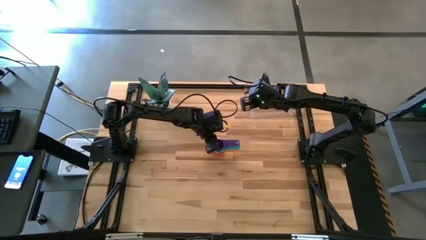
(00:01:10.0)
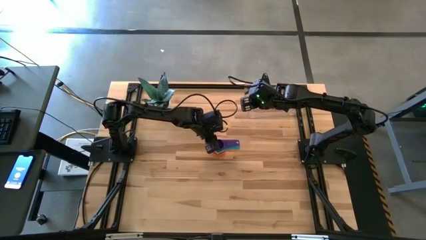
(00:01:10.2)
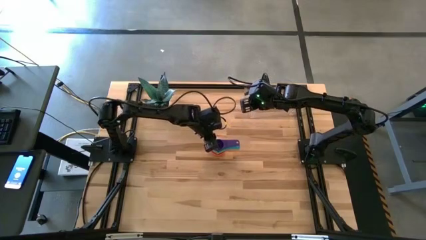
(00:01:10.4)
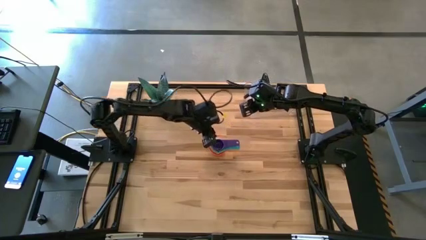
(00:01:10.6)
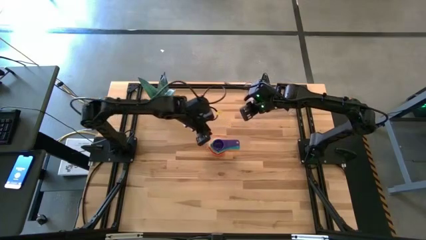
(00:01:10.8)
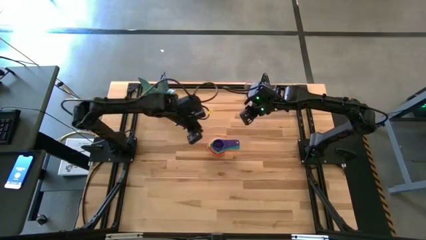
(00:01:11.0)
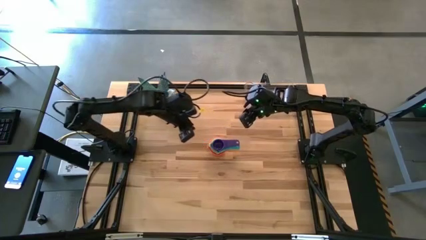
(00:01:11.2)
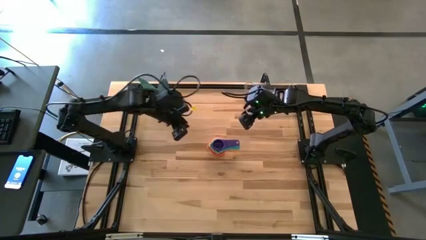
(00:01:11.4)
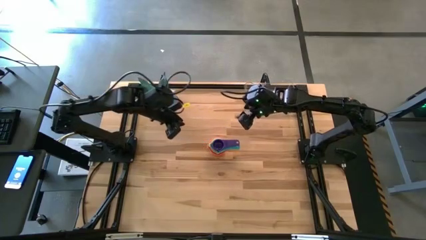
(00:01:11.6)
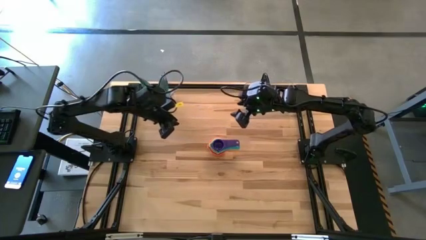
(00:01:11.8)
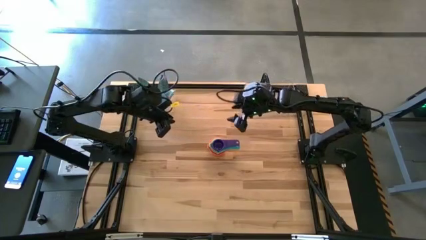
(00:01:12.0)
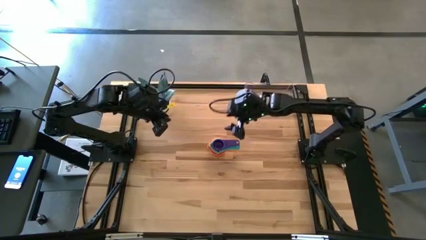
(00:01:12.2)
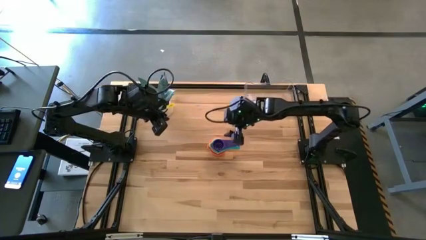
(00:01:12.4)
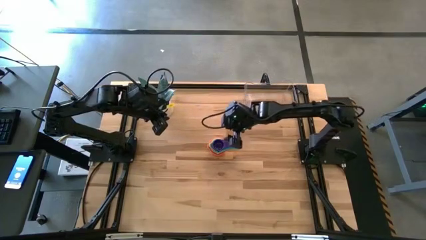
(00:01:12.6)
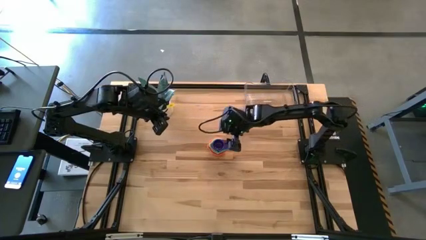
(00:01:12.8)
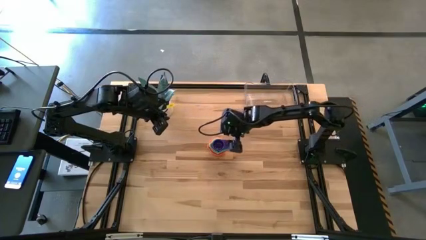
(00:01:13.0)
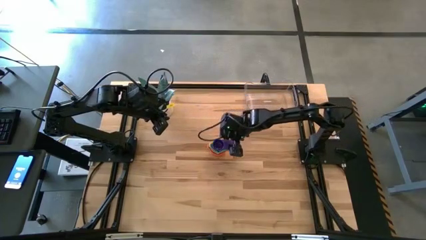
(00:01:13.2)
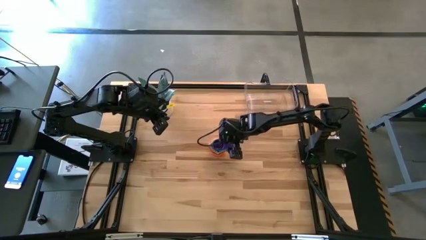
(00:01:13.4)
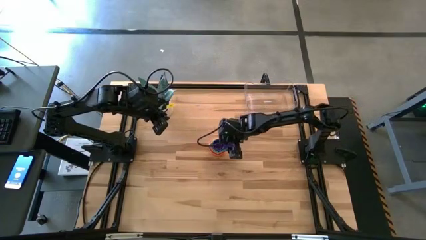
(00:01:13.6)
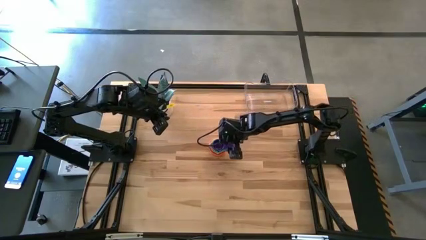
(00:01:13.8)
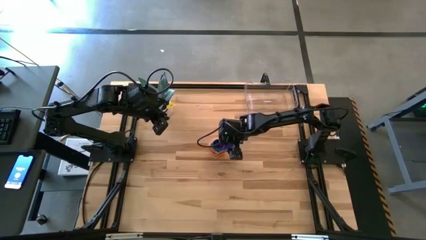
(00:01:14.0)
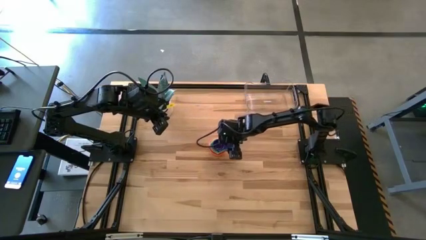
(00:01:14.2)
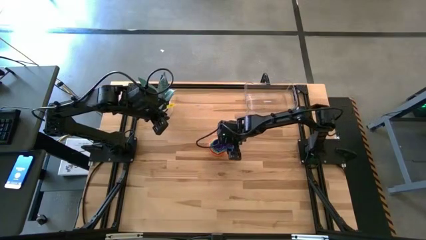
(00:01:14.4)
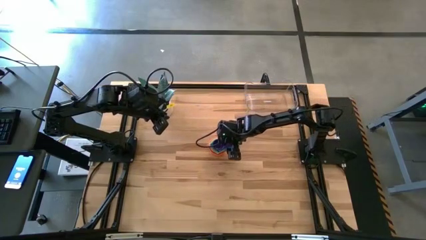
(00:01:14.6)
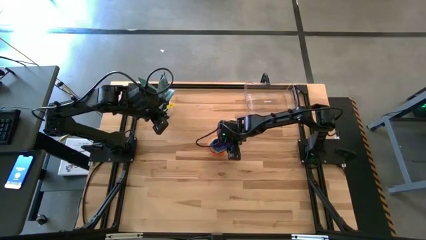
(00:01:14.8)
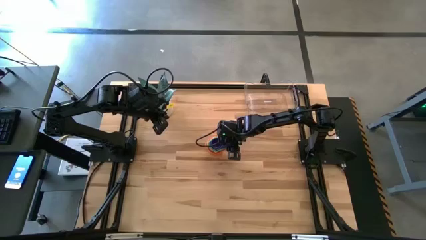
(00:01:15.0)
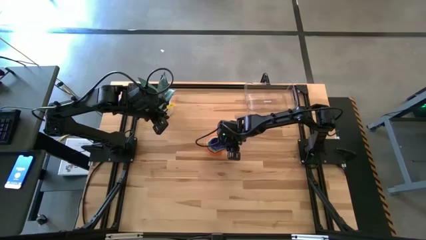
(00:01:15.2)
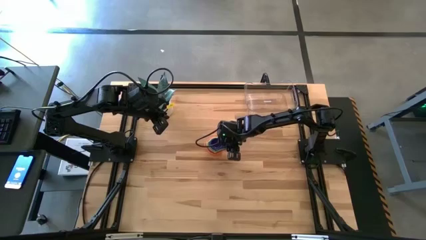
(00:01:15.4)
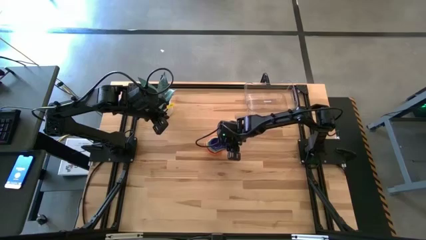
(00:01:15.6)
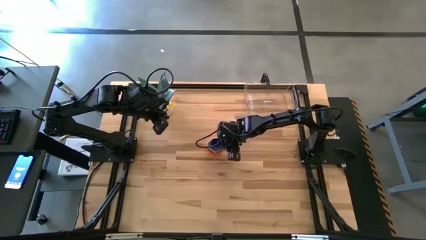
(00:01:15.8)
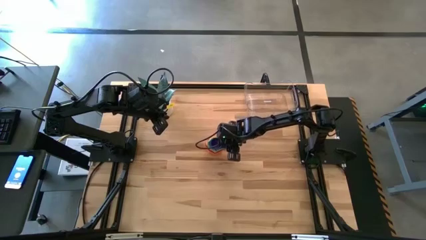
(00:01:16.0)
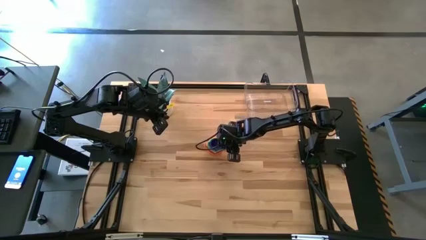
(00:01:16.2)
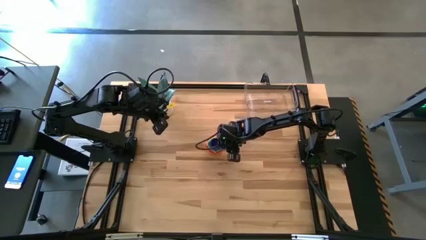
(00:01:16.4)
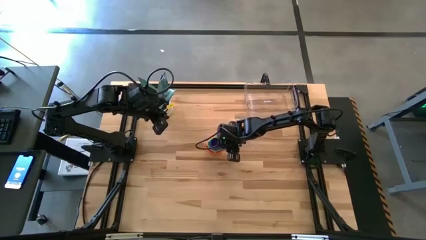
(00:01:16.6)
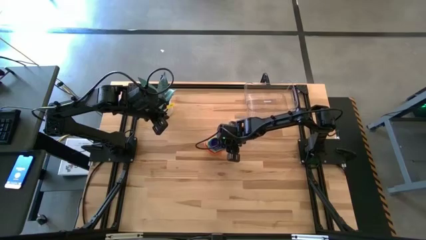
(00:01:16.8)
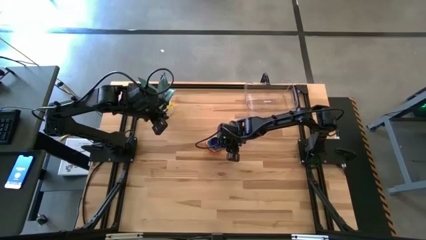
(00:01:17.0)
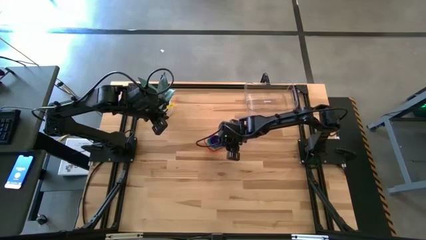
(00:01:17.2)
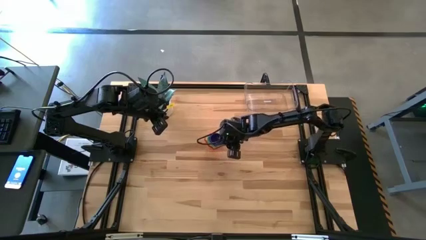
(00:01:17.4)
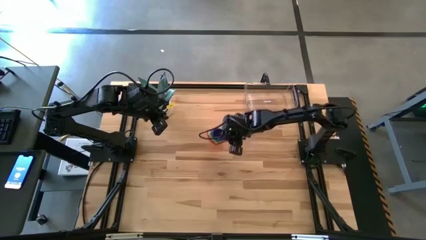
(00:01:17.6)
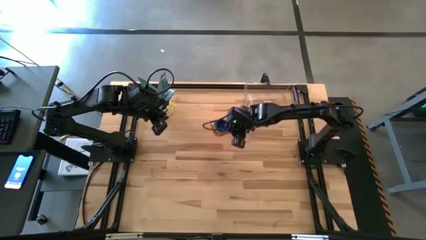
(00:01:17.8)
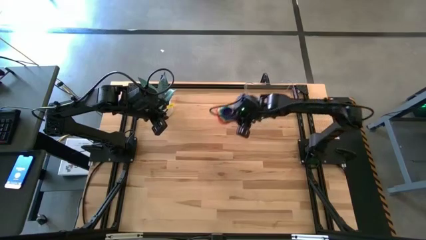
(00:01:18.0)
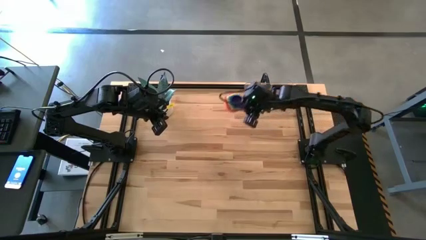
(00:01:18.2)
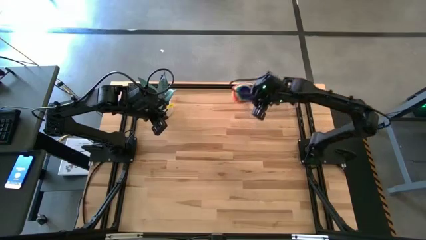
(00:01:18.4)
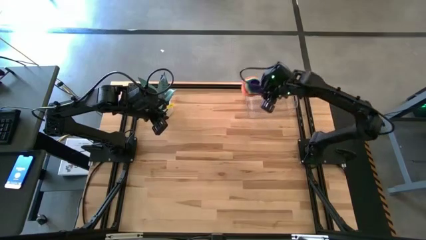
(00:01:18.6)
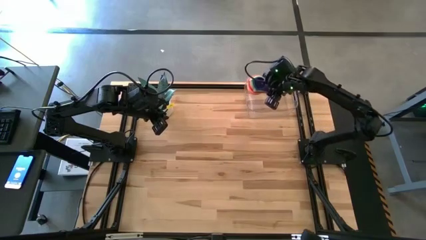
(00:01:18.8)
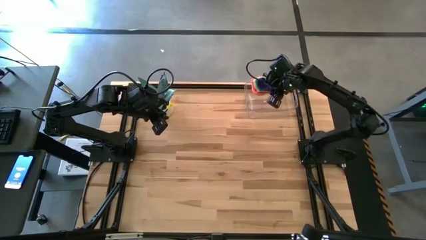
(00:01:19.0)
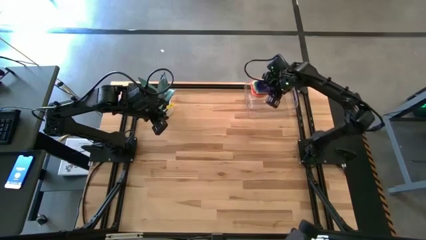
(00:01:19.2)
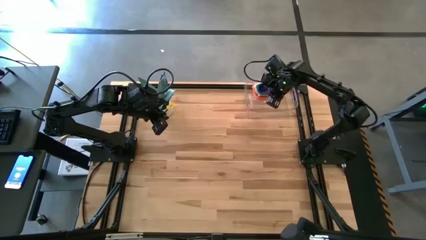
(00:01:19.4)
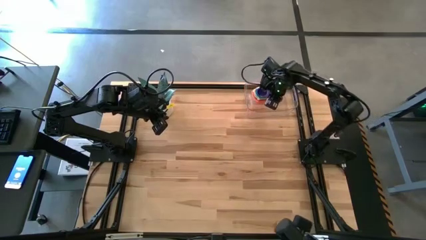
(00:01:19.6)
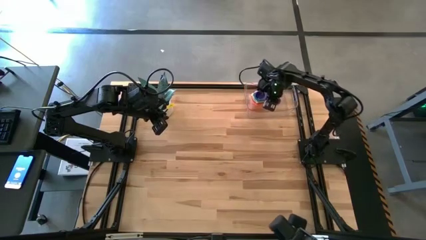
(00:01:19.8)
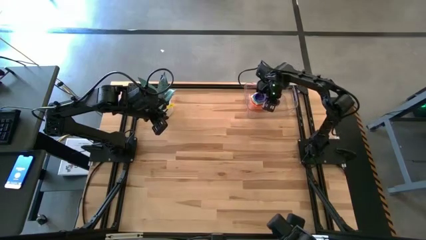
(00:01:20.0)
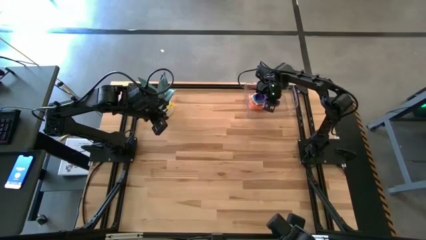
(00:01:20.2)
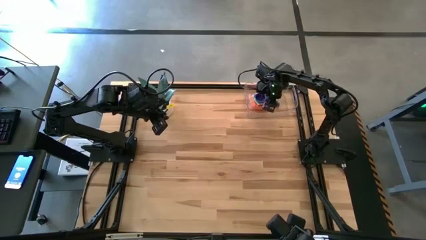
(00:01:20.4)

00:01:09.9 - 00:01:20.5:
Task: Nest measuring cups in basket
Put the nested measuring cups into the transparent bin

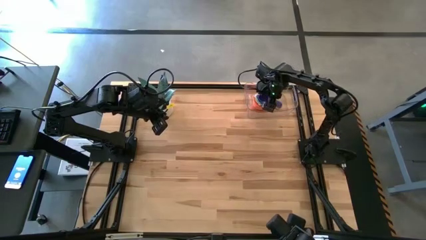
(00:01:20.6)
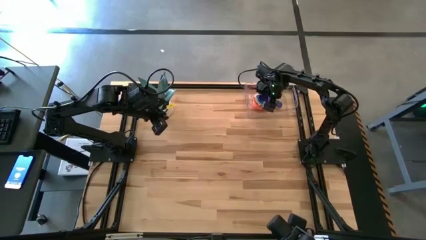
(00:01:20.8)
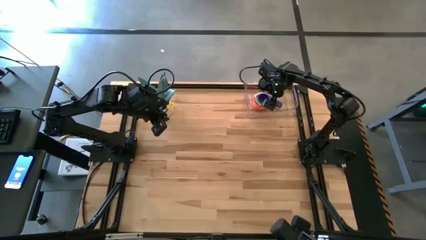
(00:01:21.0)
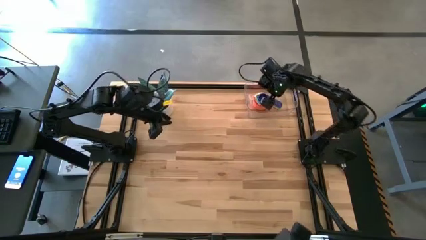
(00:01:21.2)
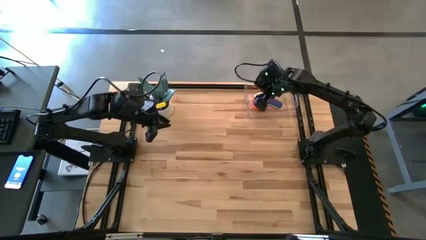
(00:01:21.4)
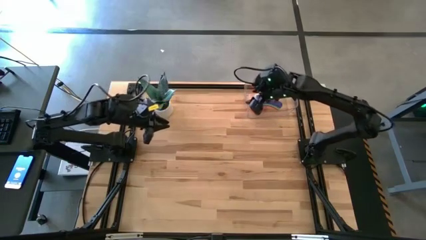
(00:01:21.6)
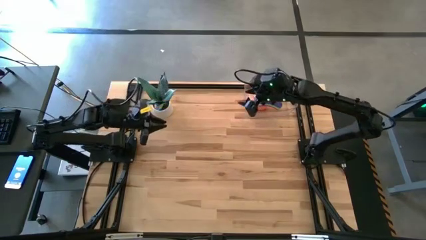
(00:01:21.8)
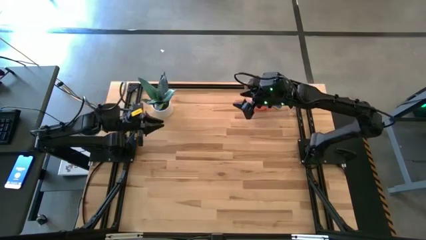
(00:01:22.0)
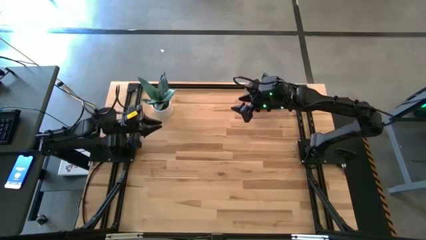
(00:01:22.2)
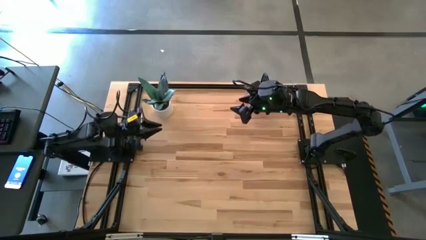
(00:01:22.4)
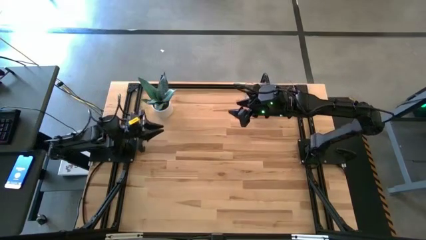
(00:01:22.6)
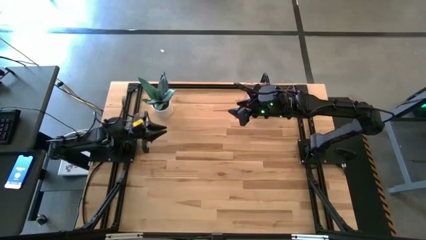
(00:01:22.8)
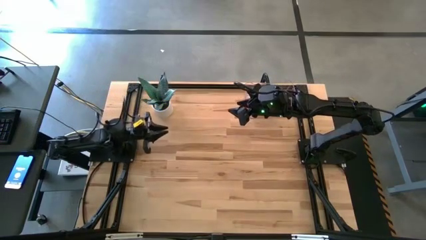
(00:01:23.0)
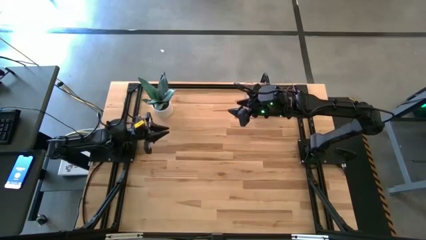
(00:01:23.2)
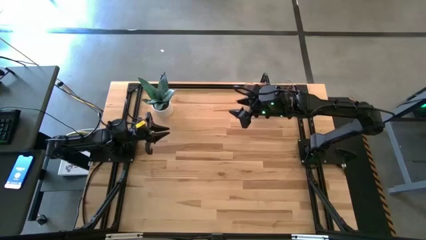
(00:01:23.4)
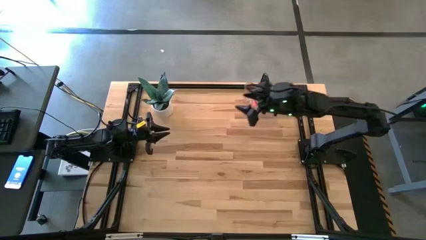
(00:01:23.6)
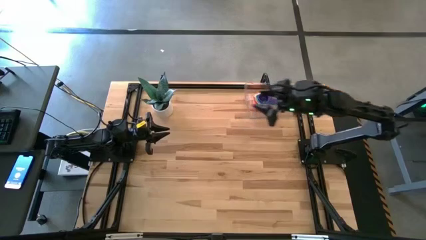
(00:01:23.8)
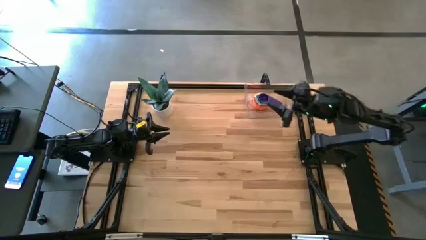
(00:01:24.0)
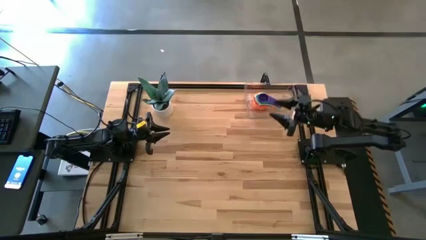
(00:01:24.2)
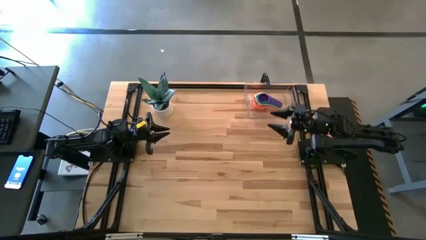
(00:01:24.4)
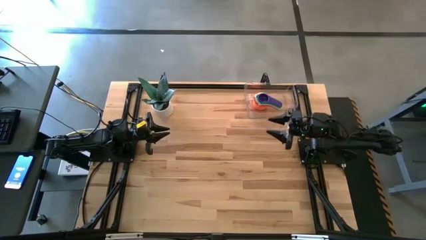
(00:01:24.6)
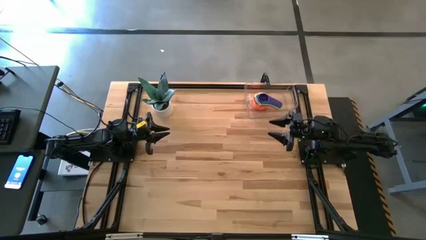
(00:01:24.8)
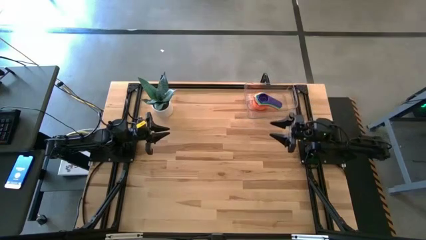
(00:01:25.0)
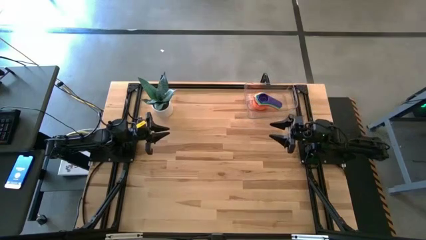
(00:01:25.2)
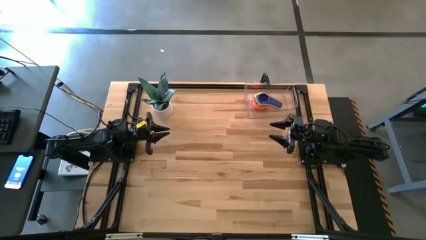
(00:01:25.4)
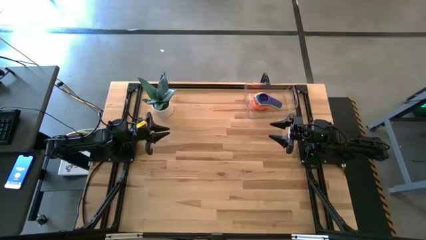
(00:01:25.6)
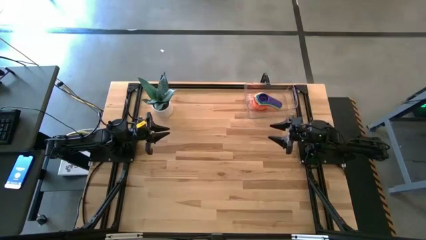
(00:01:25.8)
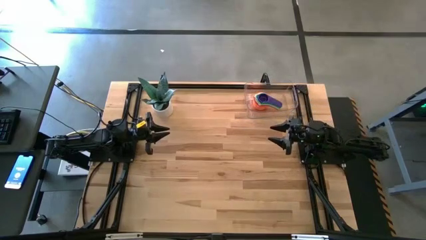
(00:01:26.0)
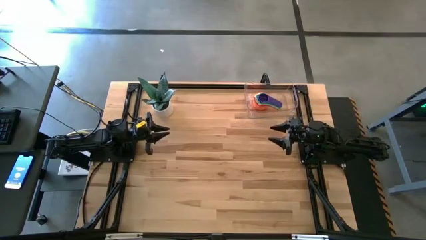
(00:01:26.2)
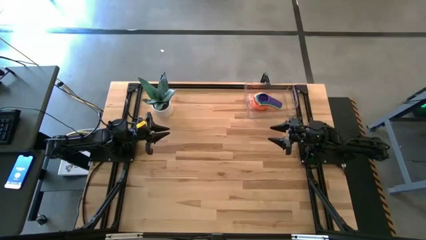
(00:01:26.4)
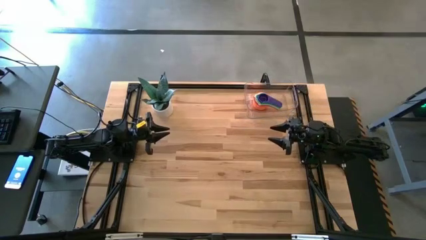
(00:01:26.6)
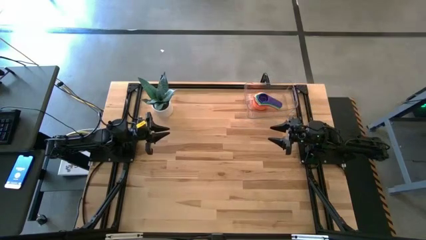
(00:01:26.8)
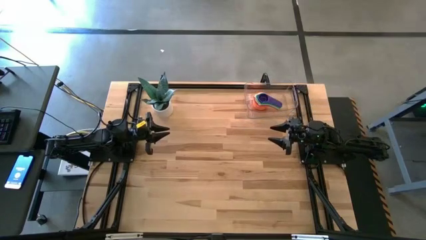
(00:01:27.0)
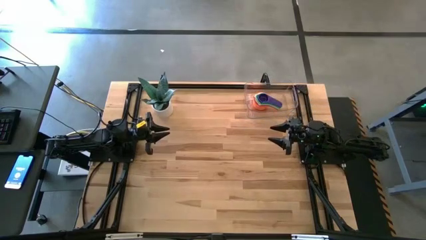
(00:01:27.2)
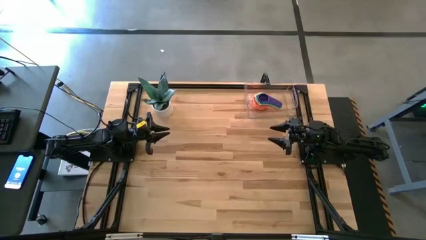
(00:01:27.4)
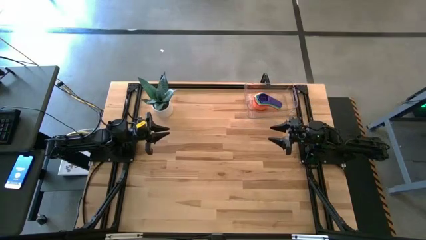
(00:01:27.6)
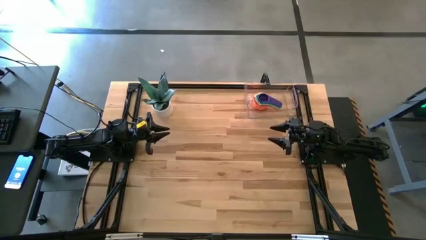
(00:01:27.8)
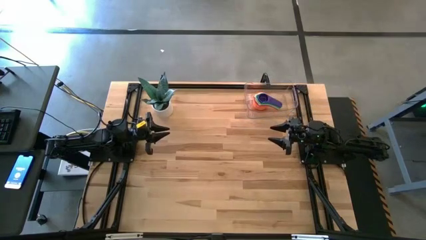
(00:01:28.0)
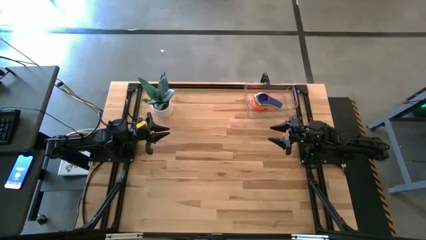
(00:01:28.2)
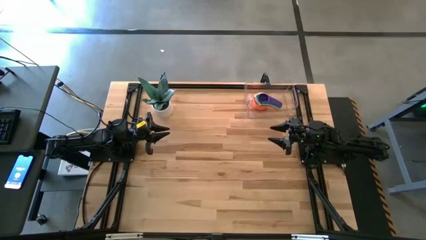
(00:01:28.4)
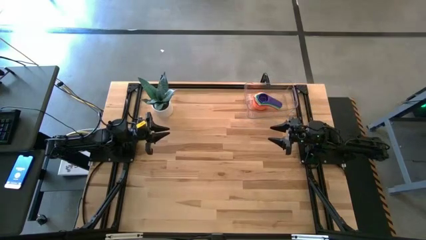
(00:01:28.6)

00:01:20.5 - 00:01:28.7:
Return to Home Position
